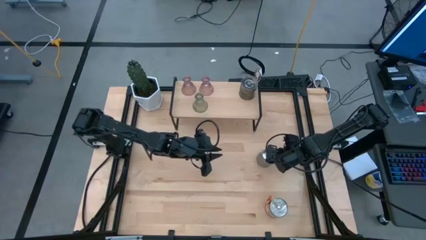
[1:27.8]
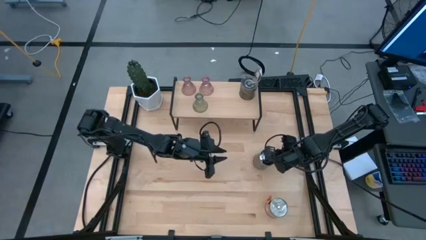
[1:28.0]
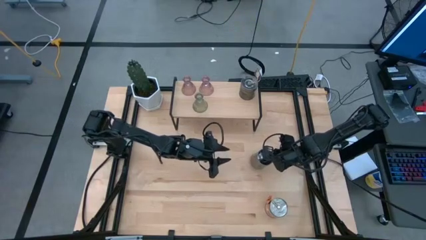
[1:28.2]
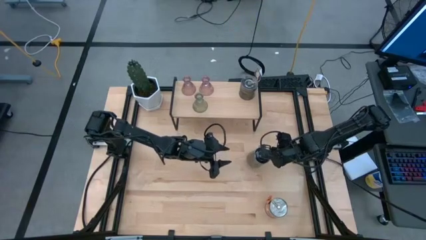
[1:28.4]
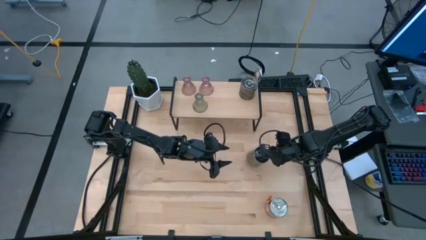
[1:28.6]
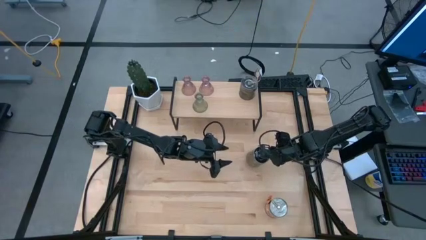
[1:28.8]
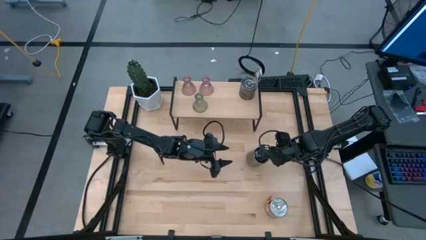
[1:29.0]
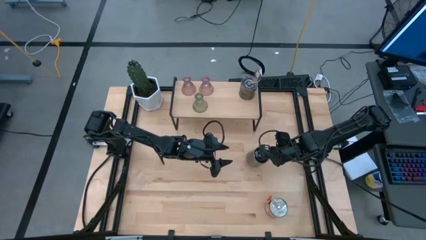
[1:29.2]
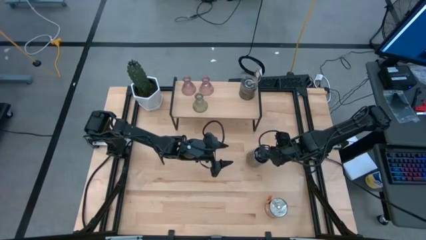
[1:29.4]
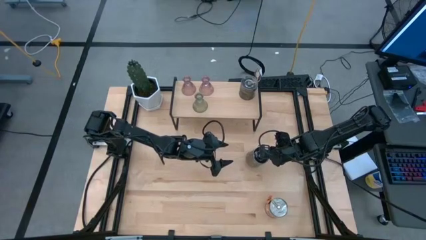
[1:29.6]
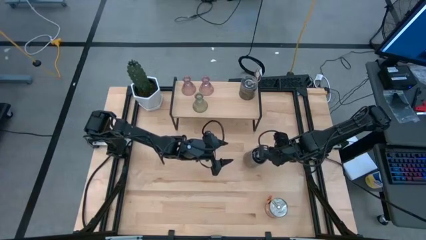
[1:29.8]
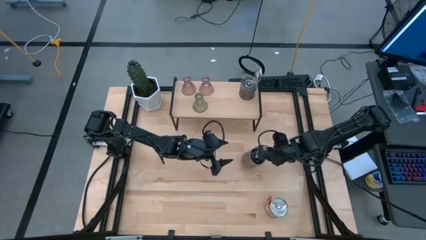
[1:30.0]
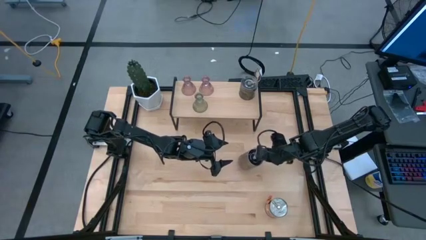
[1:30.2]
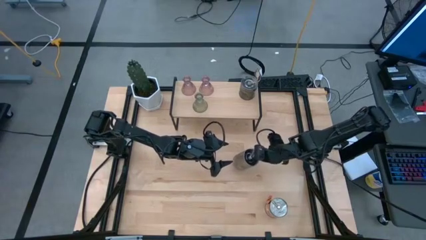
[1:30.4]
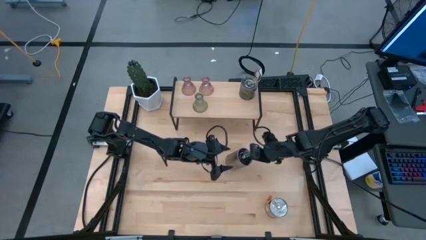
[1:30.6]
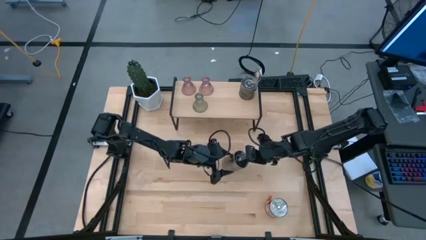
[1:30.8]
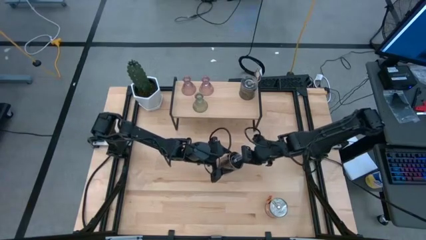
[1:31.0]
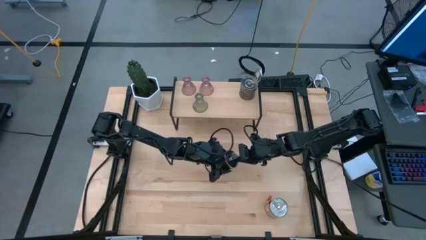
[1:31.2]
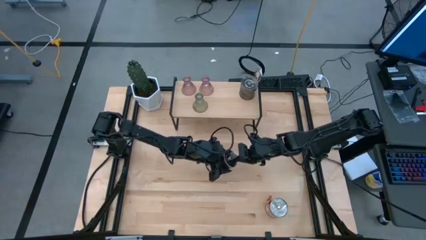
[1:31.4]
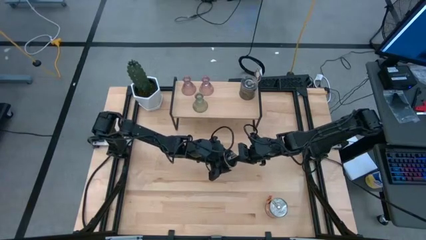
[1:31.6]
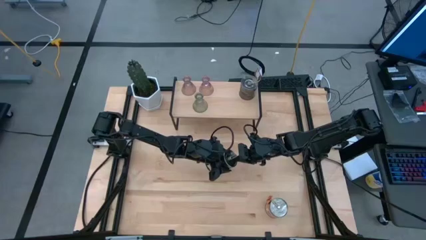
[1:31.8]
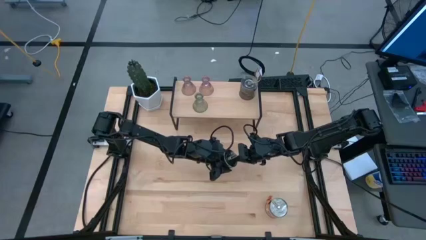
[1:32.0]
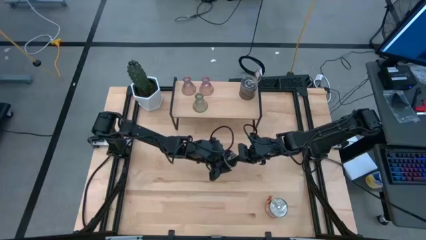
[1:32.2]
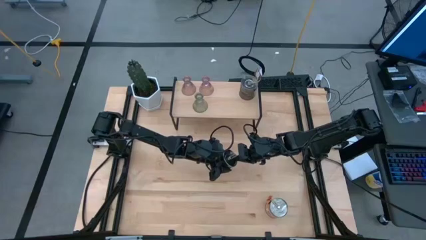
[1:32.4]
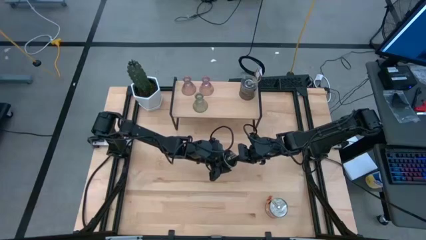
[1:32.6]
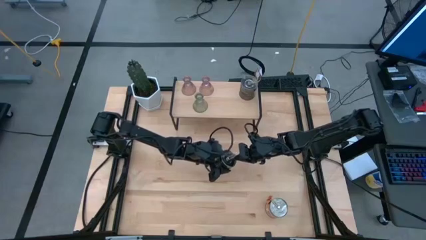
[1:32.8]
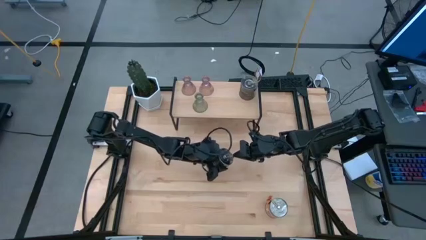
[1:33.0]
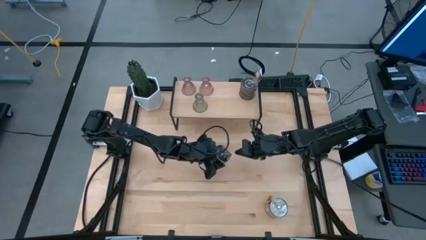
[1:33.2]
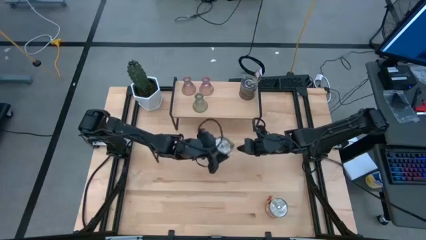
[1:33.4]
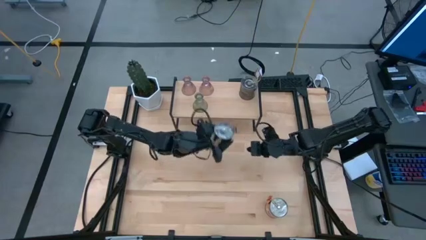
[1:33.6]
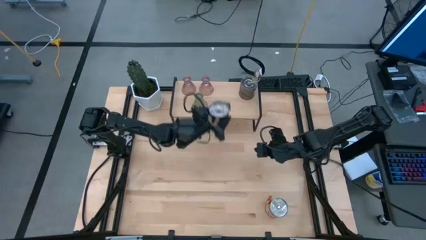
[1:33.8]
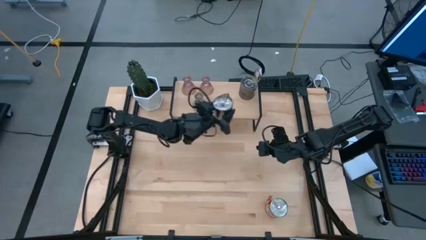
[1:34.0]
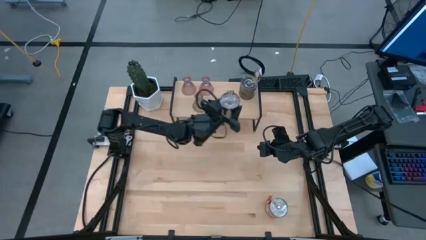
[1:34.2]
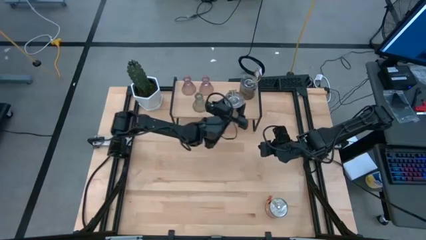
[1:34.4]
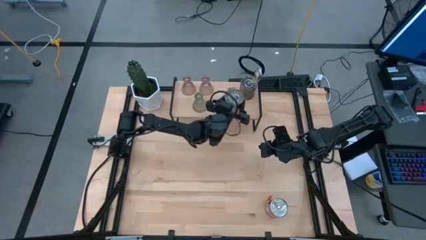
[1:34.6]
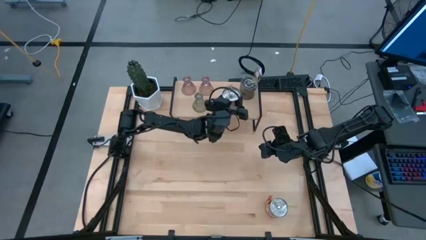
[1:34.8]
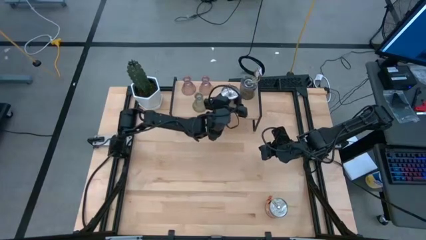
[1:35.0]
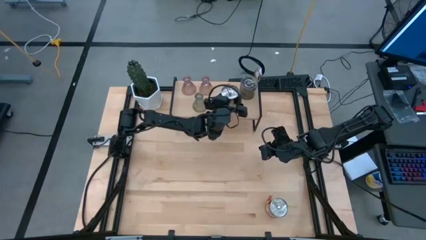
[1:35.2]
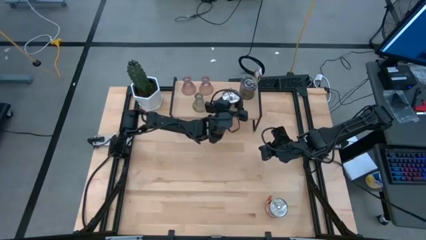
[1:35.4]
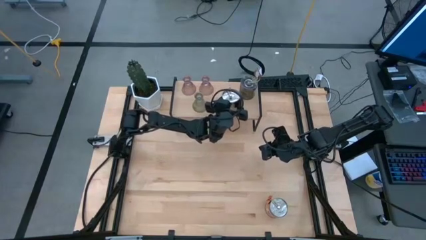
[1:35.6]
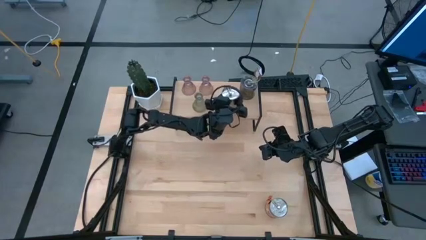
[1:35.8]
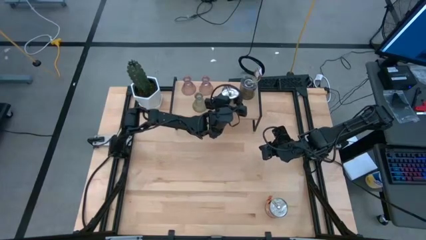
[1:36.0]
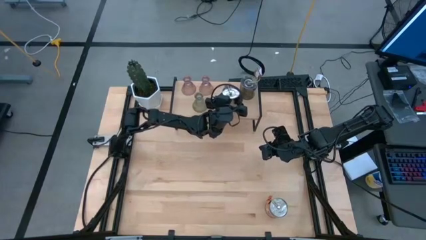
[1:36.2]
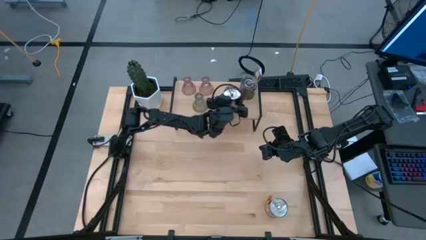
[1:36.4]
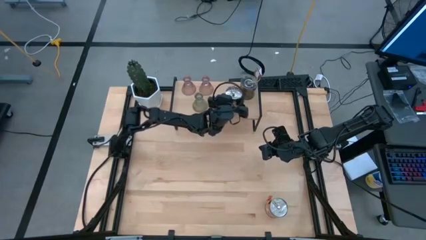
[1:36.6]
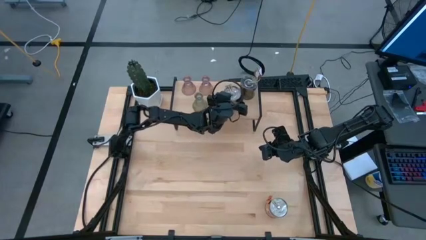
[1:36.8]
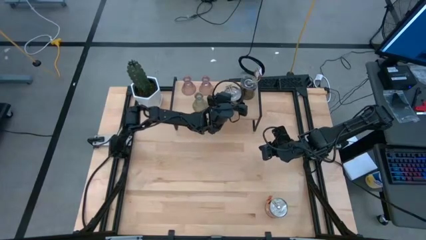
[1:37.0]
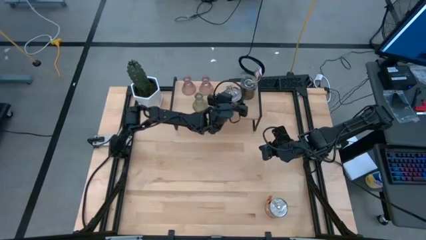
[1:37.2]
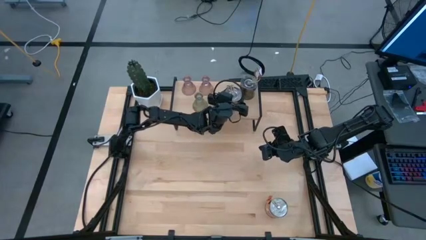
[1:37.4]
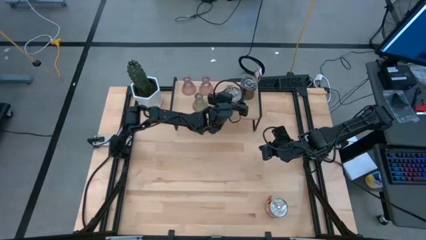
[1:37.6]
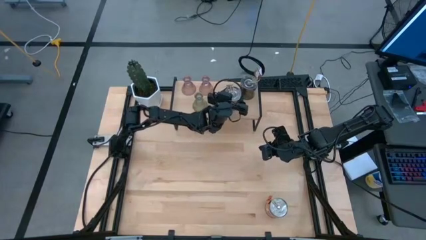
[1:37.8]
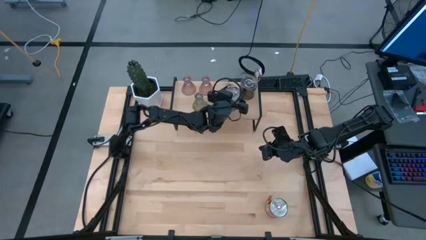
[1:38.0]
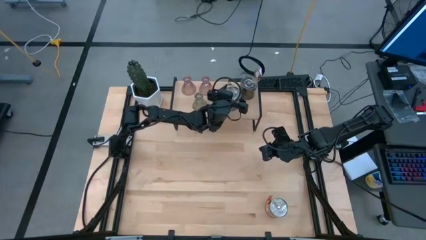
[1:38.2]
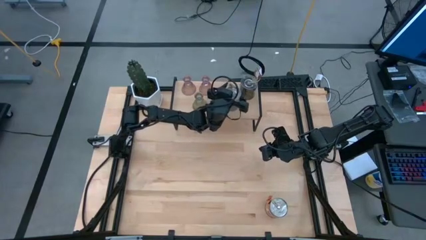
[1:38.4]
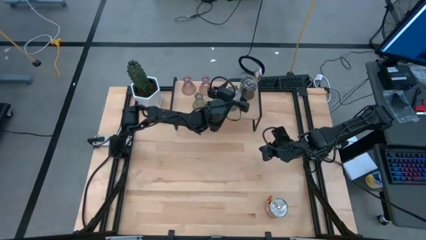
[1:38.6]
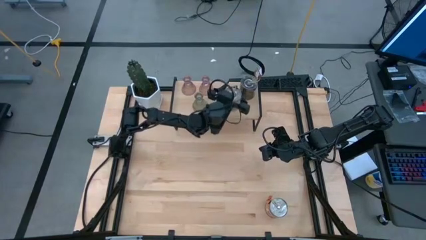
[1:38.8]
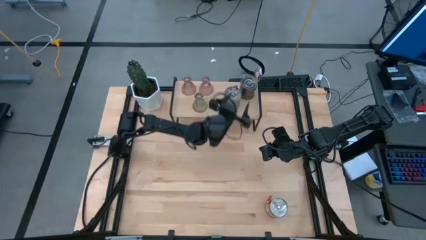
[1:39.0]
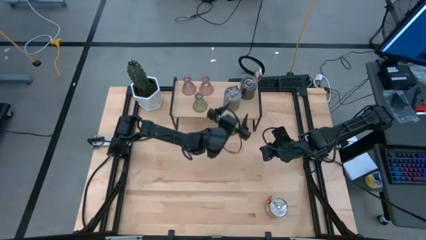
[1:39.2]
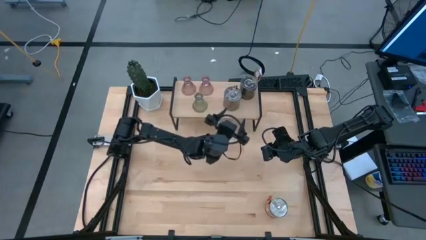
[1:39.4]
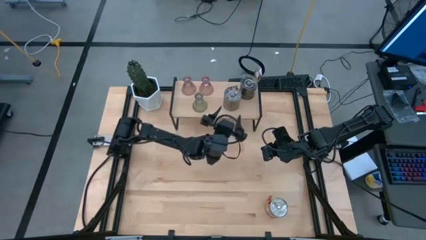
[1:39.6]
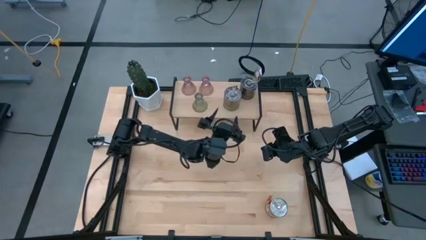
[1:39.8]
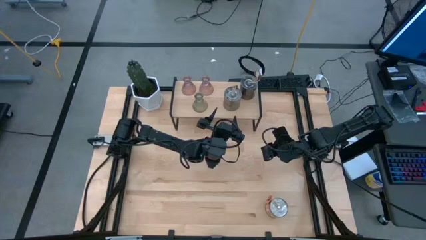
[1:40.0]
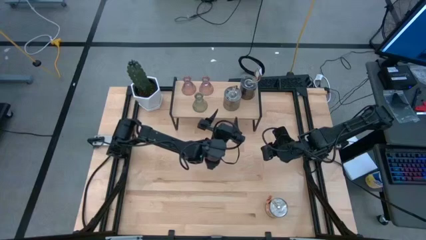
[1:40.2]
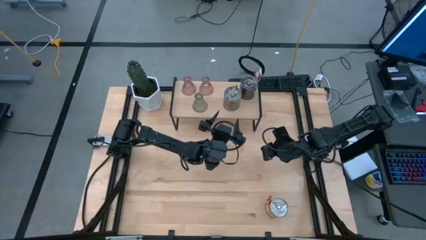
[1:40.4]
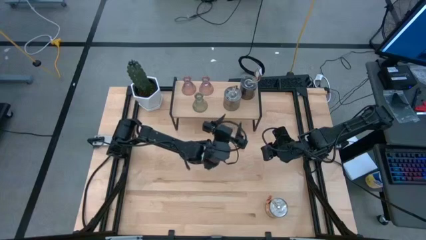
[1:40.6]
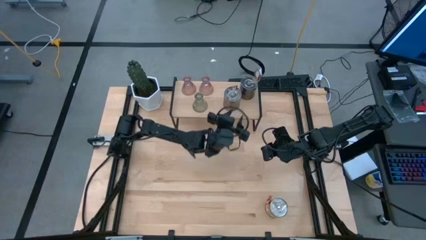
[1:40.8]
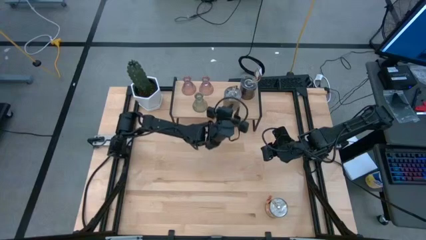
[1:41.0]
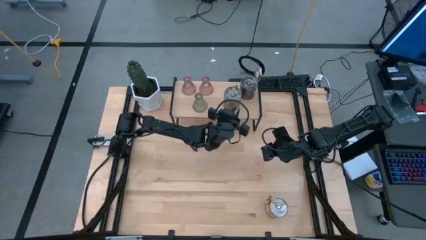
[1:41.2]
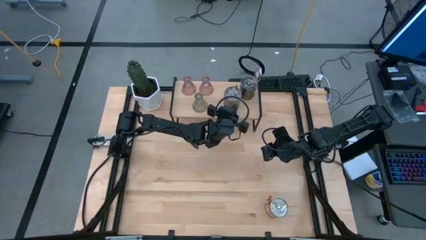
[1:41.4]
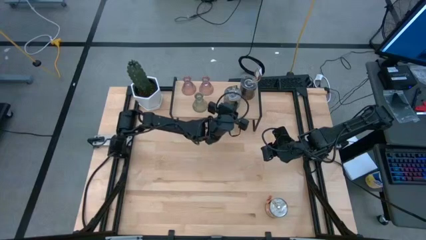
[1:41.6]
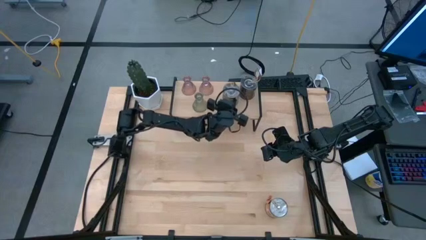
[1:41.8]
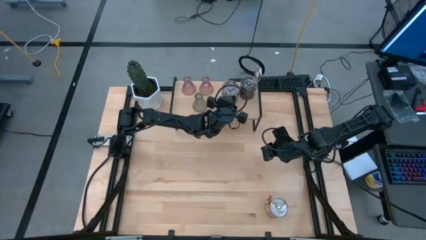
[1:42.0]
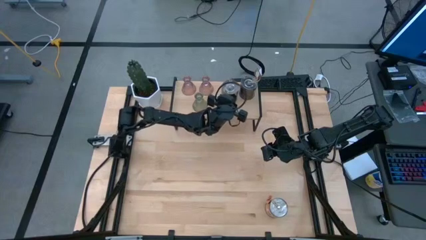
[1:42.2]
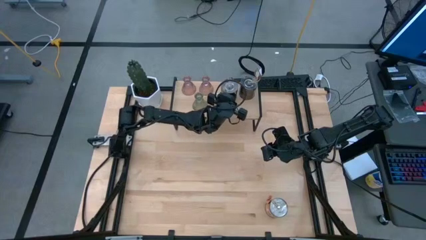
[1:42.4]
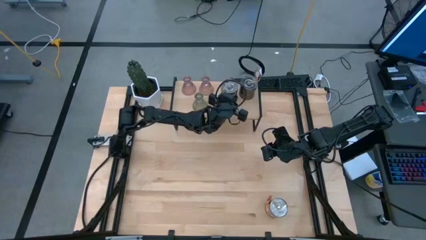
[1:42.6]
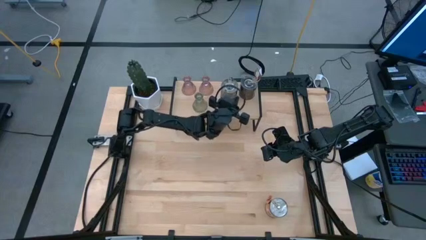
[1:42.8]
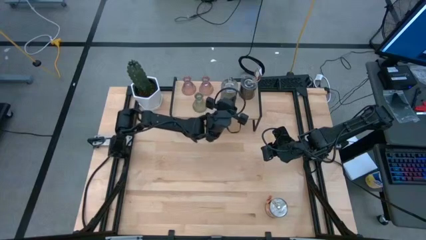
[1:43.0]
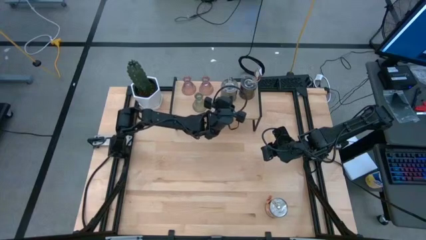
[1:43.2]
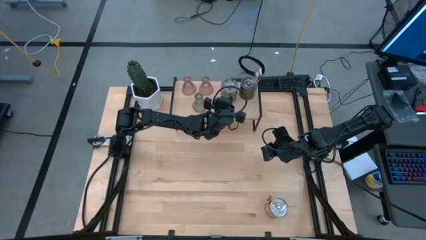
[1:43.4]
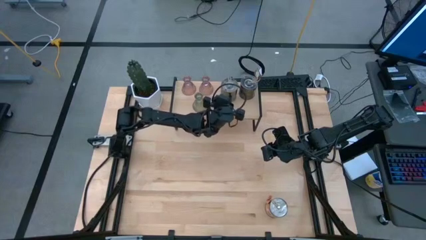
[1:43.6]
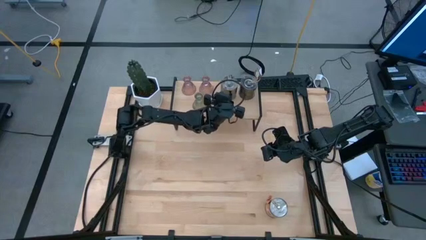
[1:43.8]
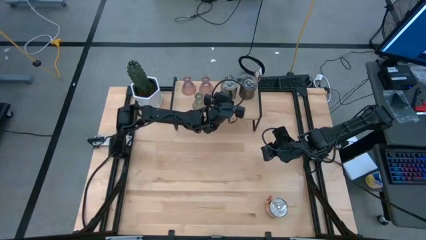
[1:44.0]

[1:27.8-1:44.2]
Task: Pick & Place candle stick holders
Put the top silver scented candle on the shelf
